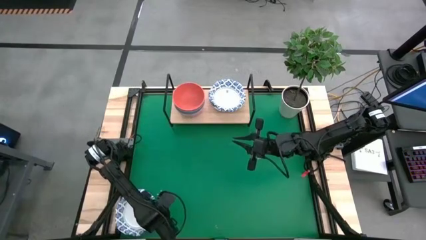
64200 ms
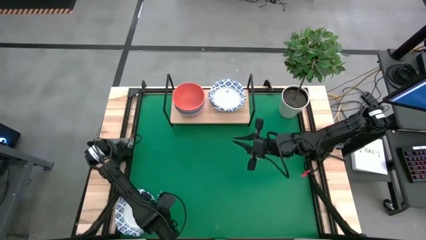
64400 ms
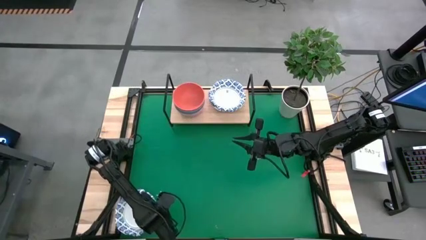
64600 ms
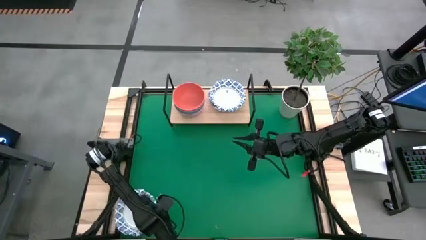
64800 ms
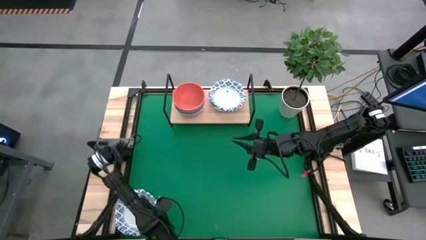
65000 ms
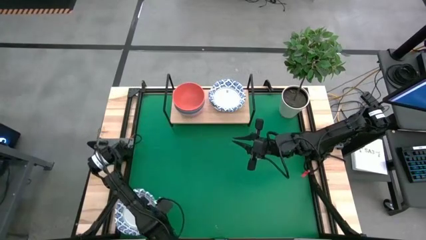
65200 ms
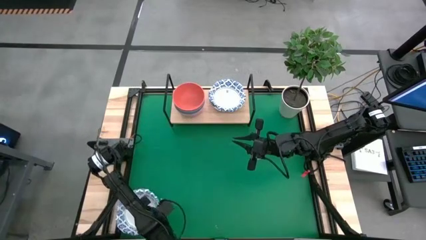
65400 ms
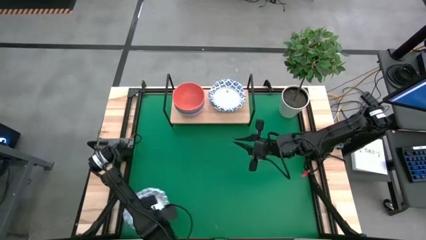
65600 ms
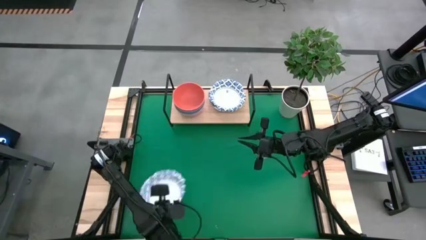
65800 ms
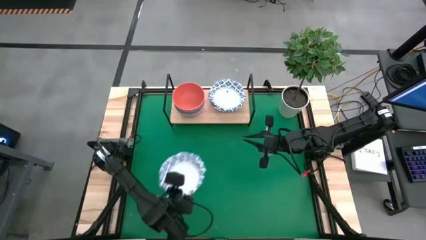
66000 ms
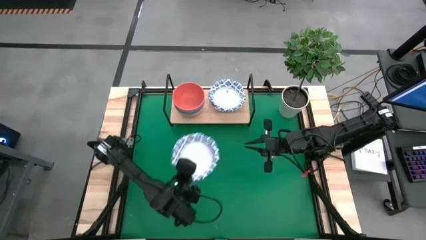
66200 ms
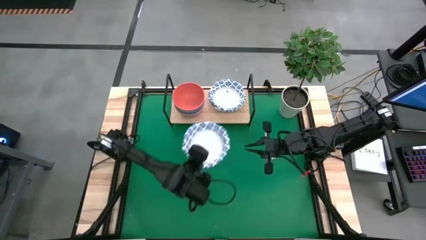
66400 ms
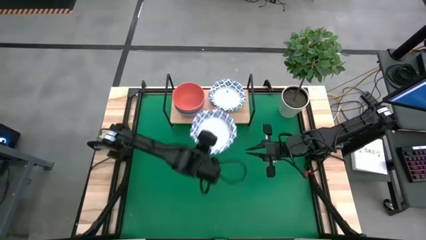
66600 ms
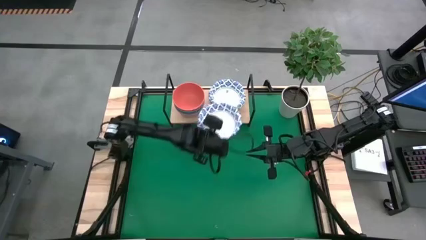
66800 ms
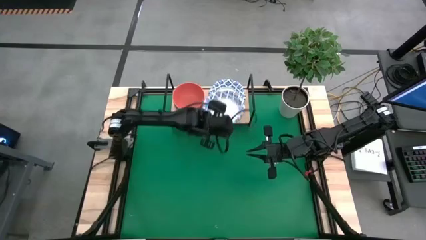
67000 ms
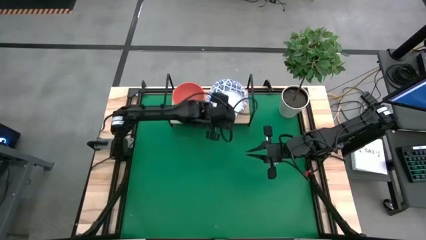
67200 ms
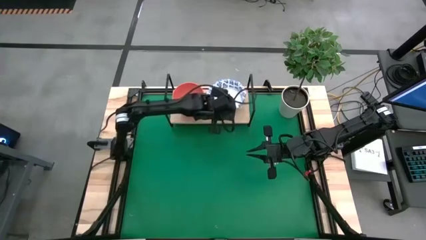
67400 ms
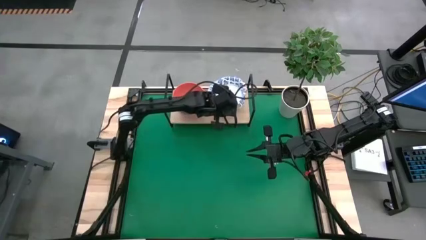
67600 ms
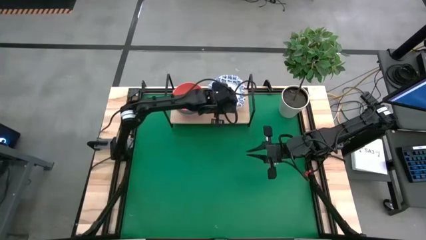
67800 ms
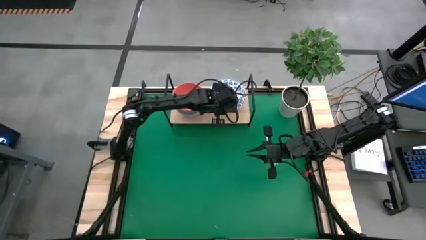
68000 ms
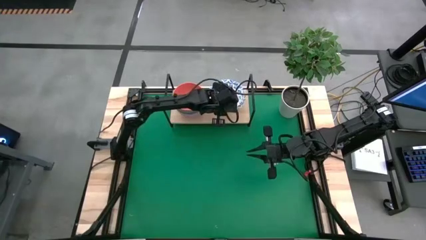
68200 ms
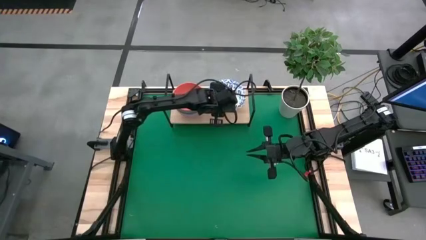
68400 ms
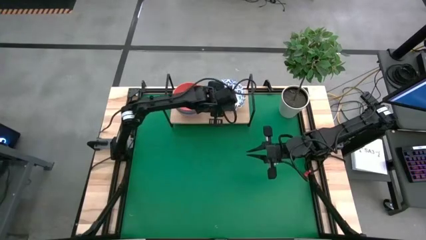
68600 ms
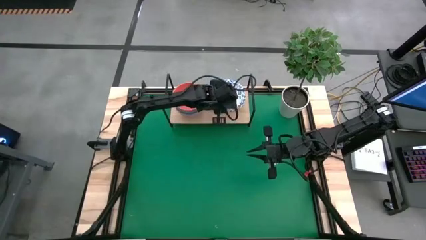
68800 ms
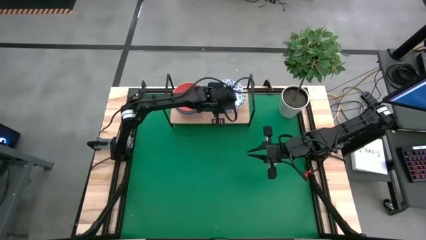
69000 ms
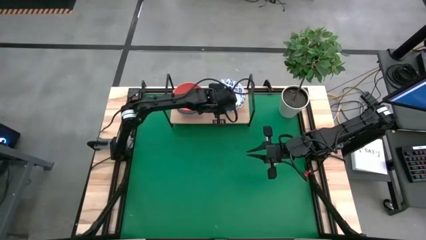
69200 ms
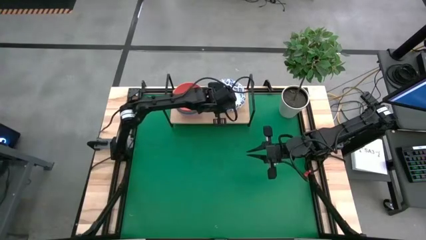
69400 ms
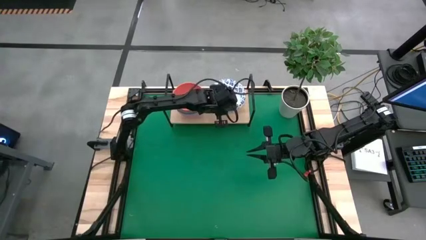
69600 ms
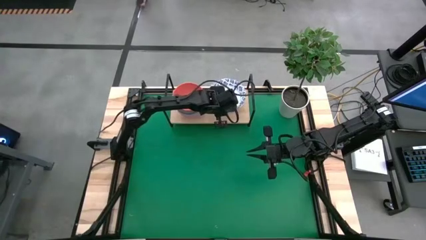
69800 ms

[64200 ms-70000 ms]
Task: Place and stack bowls onto a shelf
Stack blue patterned bowl on top of the blue patterned bowls on the shelf

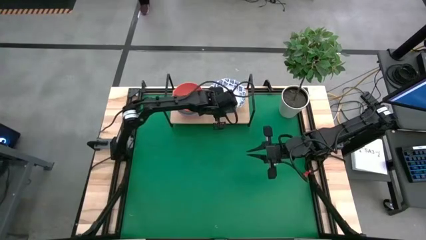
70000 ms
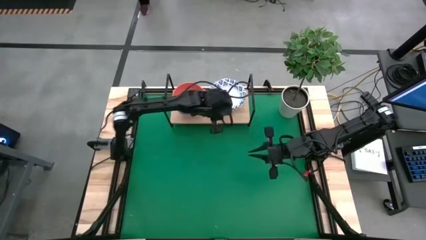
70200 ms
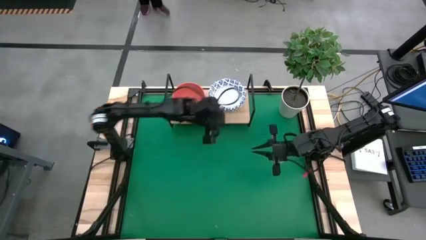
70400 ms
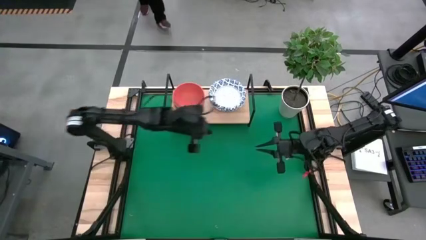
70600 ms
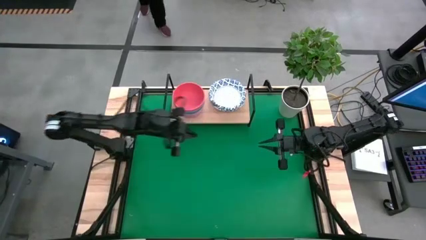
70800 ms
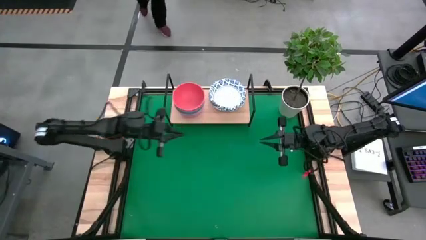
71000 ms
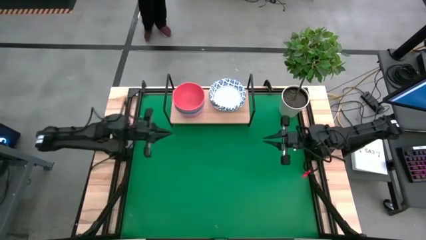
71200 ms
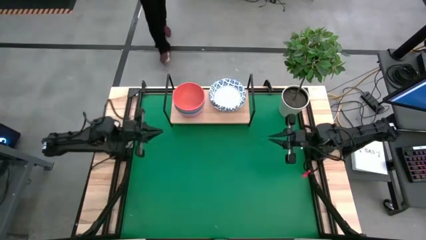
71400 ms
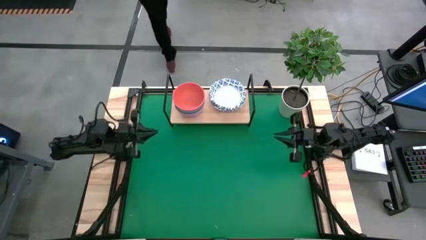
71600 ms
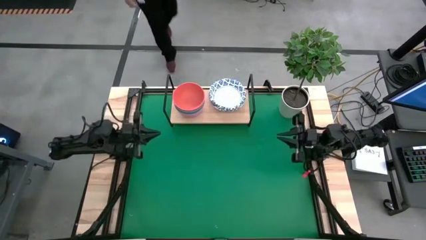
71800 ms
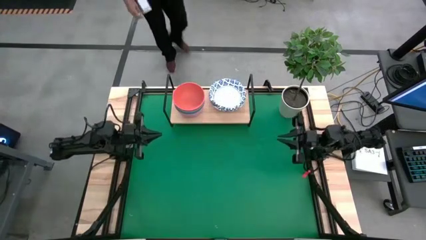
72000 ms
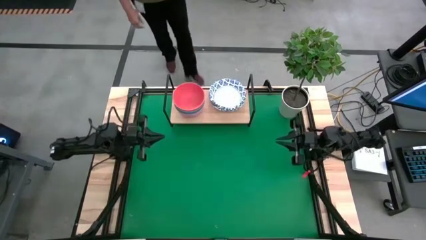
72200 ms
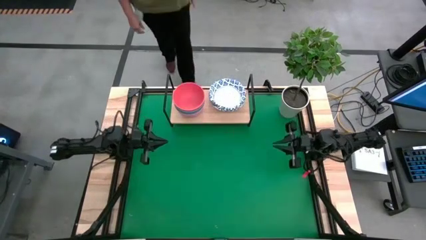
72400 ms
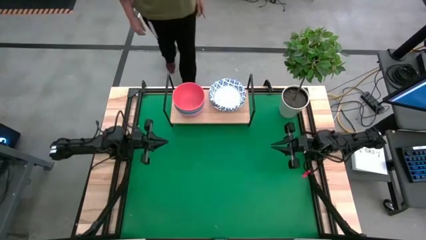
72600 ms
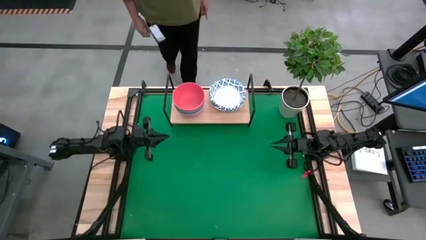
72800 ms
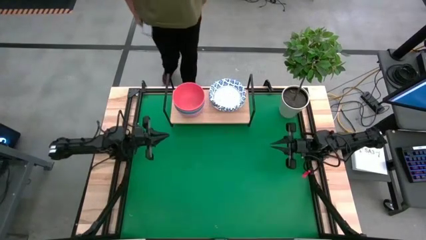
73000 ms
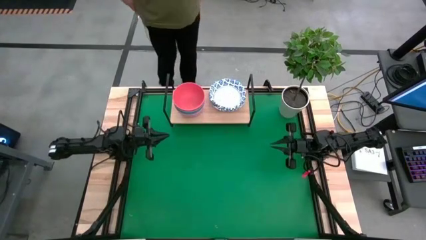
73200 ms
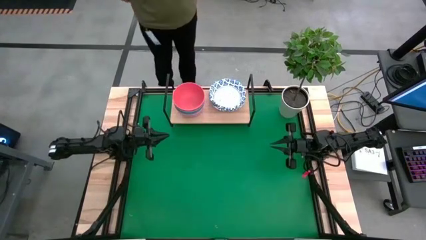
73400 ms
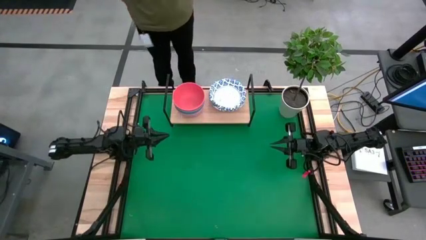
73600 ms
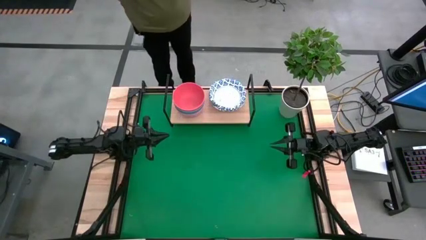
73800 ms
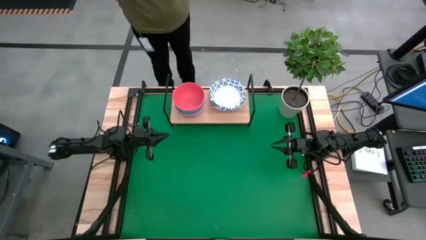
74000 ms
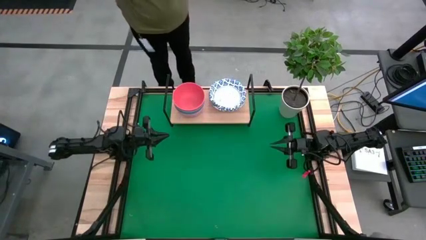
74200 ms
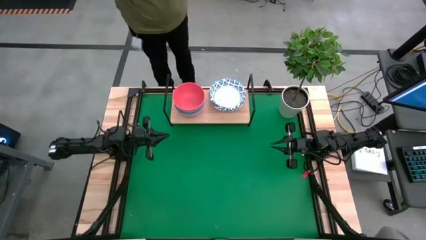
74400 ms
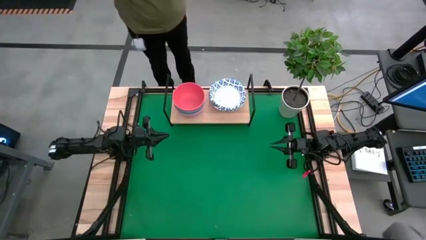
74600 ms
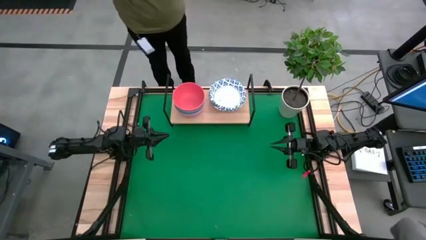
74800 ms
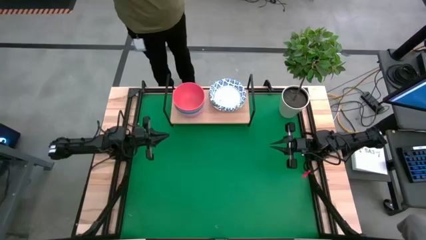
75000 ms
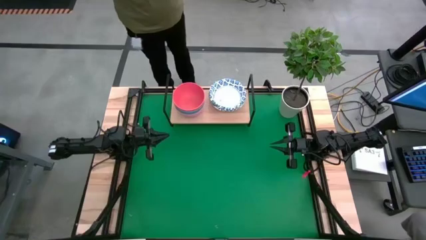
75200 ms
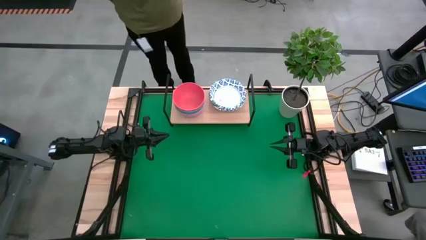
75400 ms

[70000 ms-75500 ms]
Return to Home Position

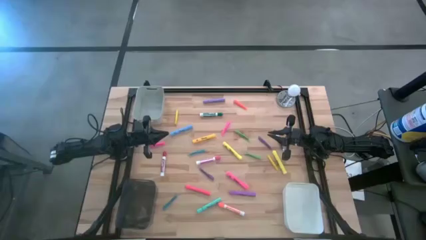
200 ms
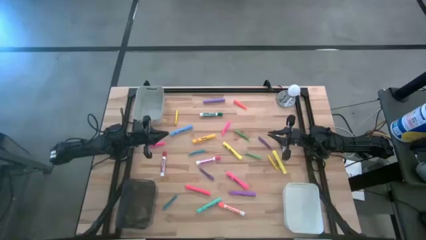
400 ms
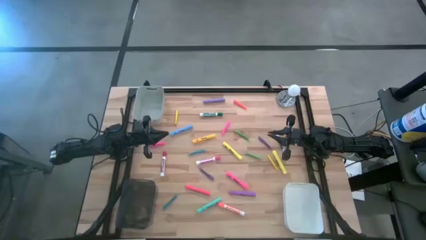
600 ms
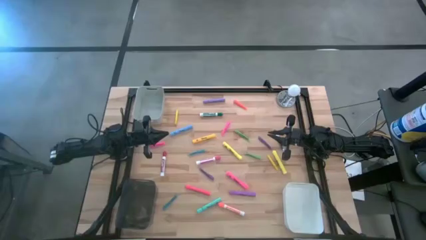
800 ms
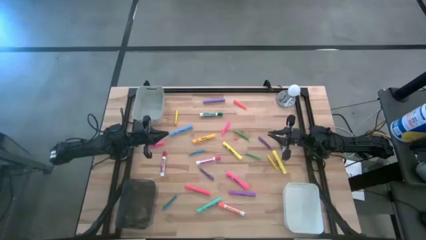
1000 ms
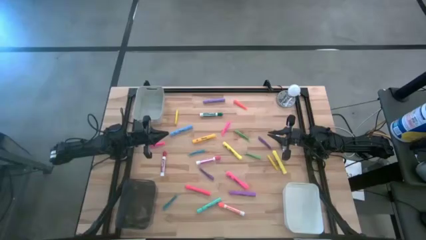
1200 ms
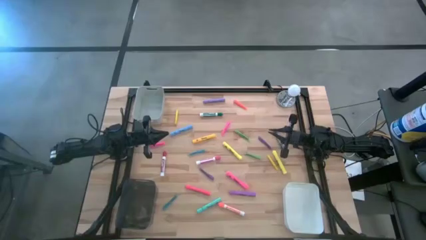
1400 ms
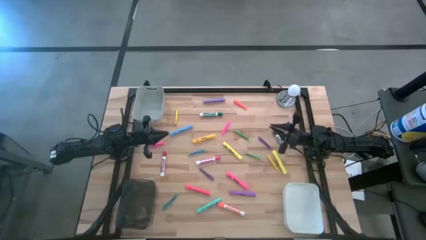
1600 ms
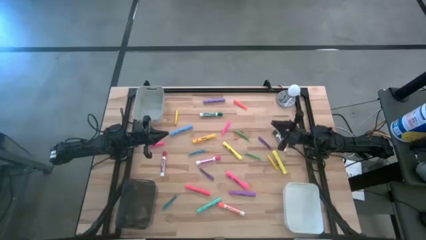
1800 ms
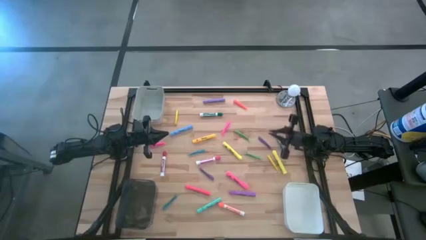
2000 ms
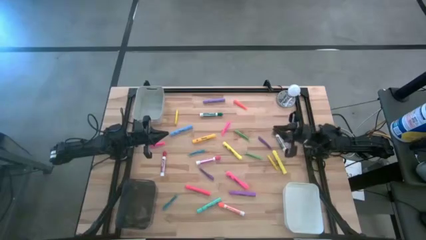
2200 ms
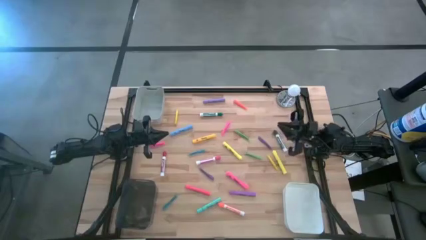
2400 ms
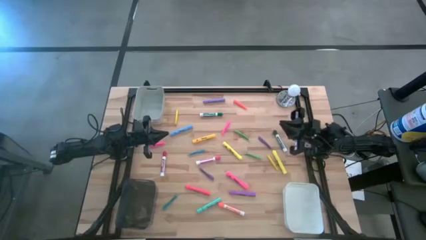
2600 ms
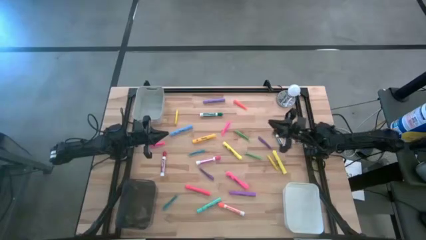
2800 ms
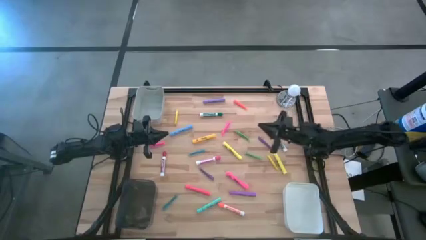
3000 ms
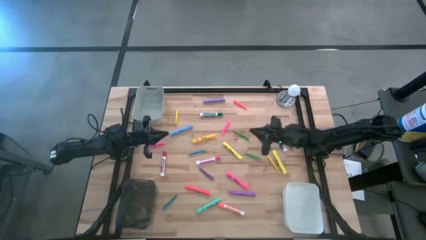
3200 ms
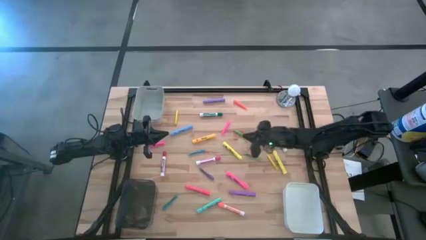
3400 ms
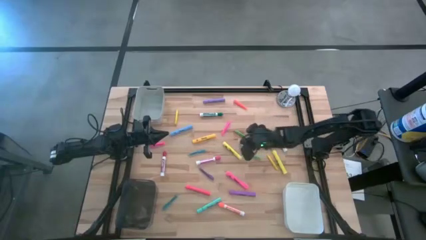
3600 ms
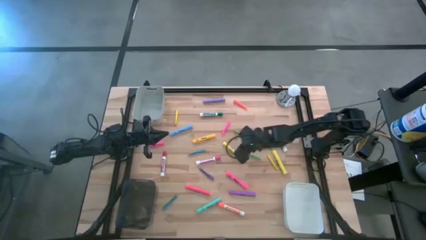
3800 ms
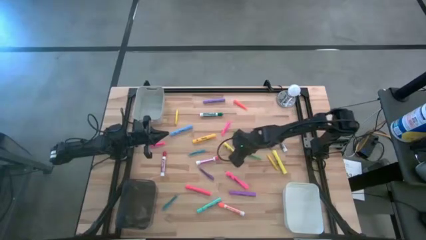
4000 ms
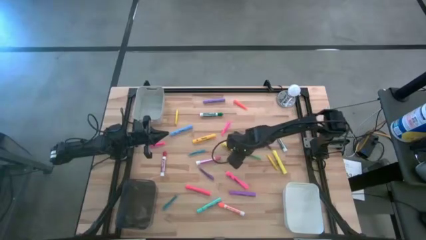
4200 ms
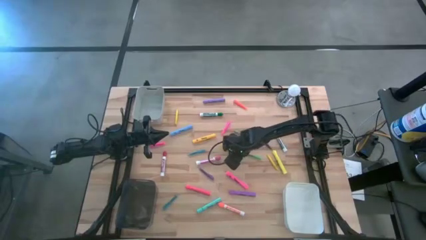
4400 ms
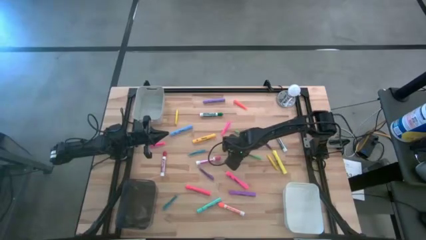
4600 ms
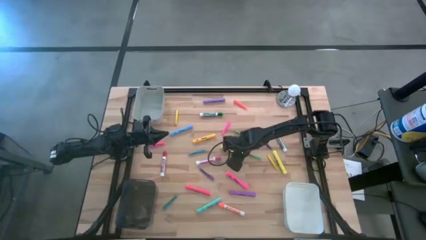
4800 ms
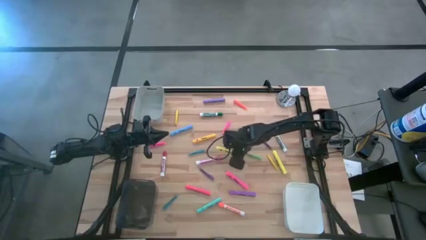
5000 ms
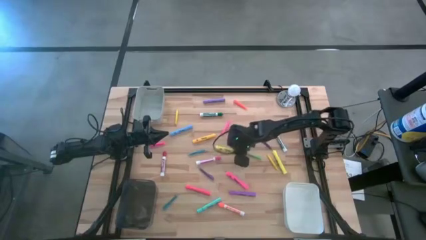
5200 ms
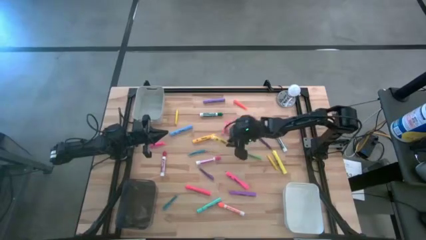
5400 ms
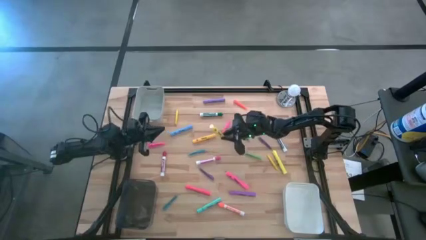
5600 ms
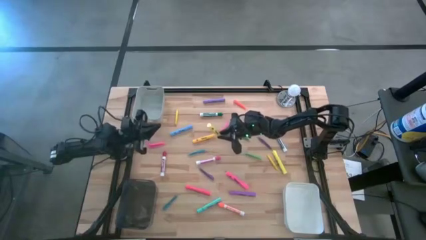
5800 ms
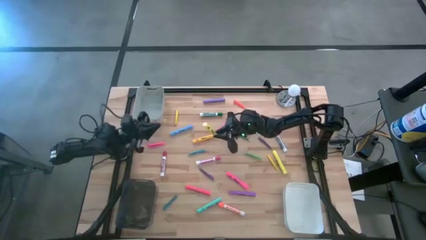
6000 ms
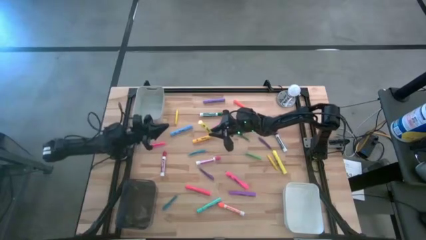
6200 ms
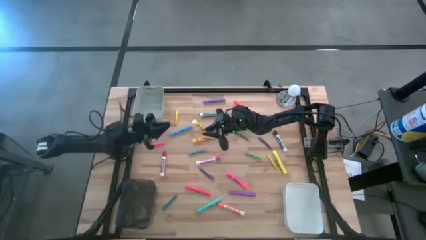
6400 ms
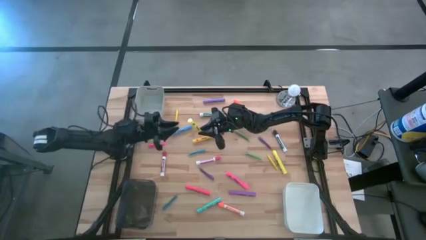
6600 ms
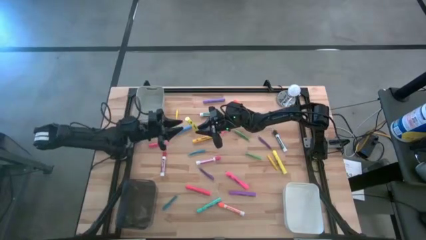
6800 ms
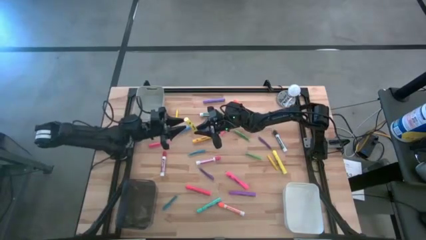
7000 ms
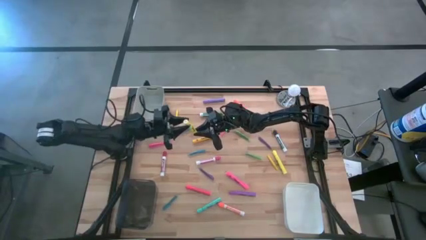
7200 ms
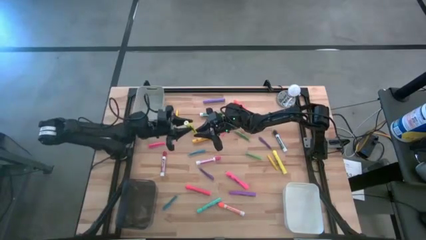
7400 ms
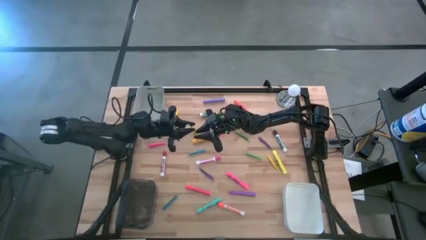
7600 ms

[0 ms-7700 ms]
Task: Pick & Place Markers
Put the left yellow highlighter pen into the black bin
